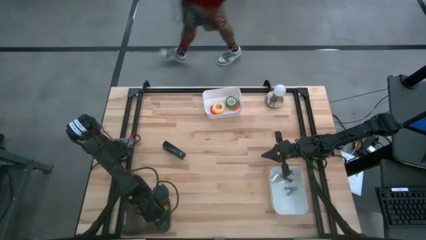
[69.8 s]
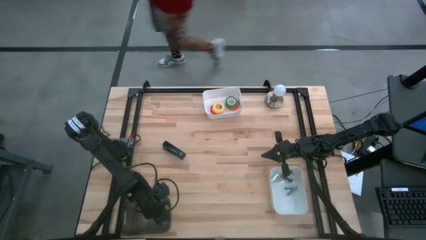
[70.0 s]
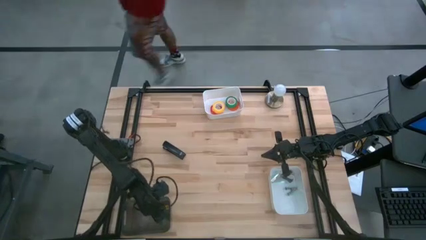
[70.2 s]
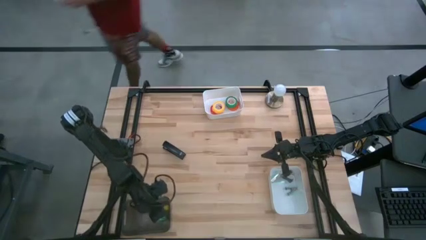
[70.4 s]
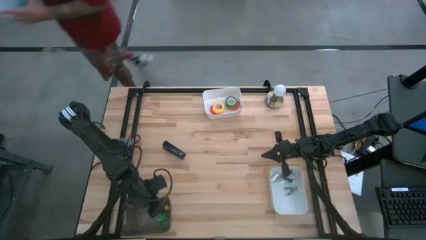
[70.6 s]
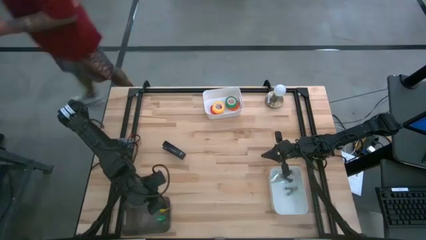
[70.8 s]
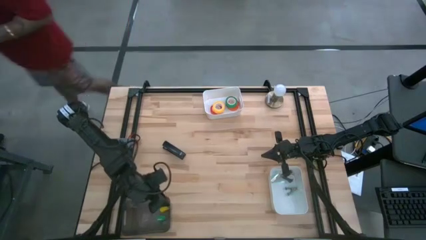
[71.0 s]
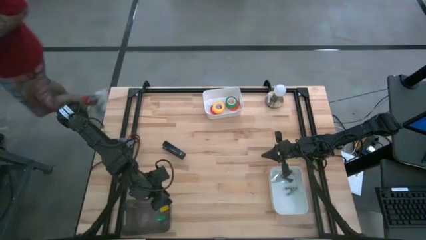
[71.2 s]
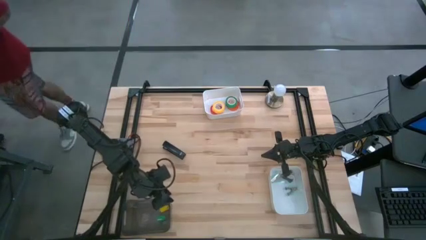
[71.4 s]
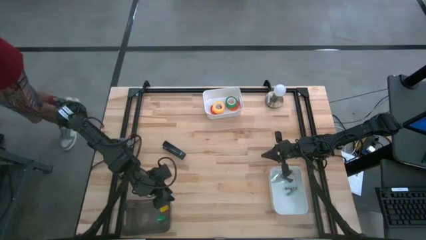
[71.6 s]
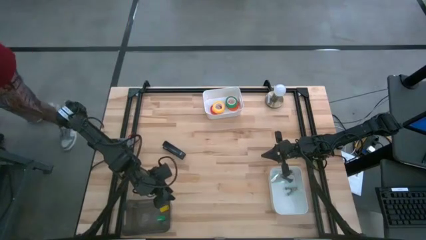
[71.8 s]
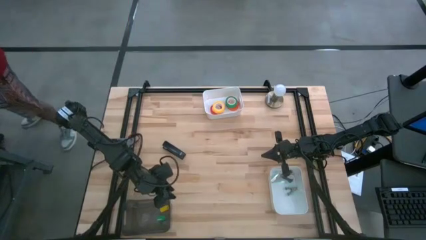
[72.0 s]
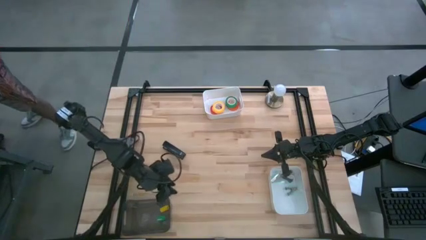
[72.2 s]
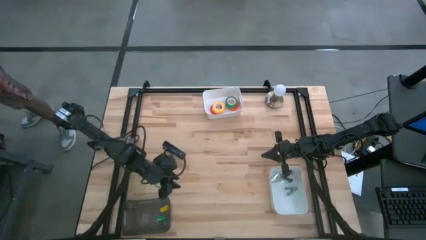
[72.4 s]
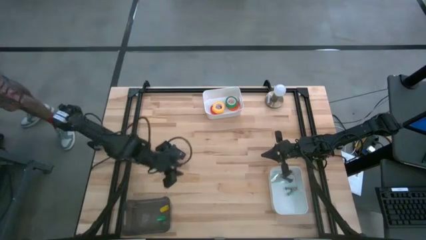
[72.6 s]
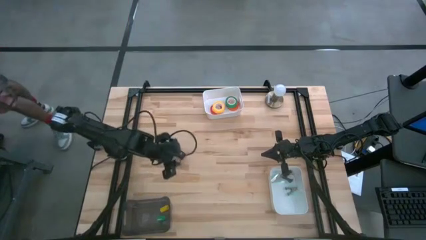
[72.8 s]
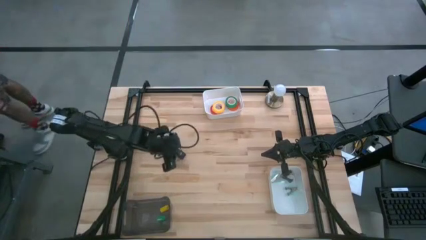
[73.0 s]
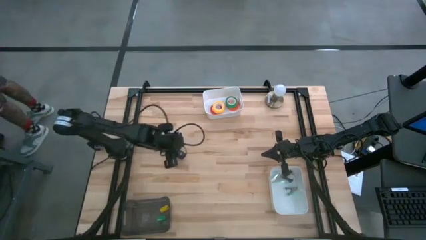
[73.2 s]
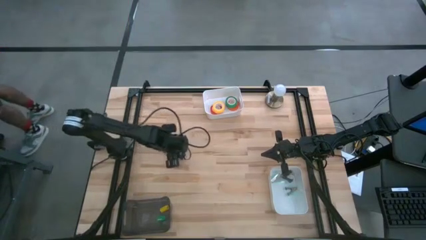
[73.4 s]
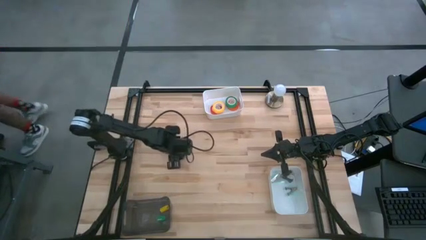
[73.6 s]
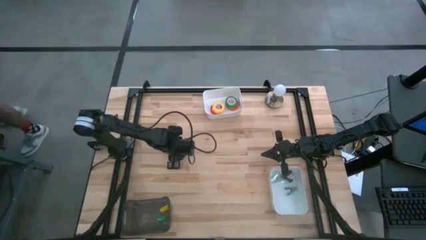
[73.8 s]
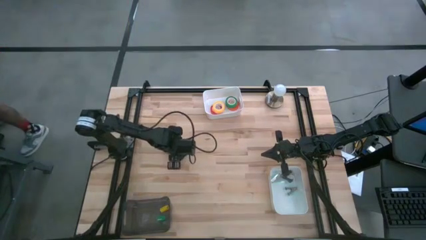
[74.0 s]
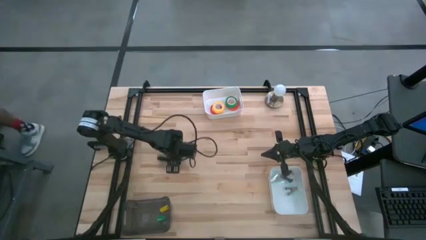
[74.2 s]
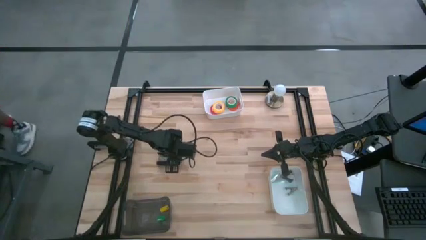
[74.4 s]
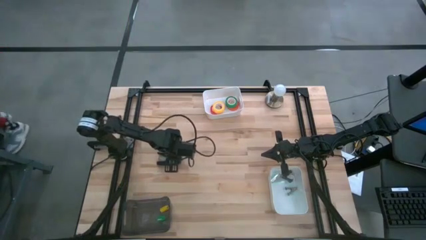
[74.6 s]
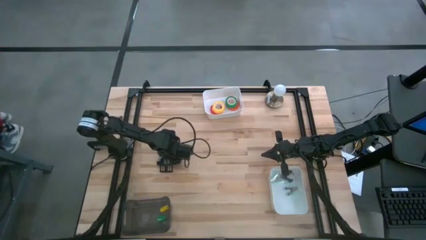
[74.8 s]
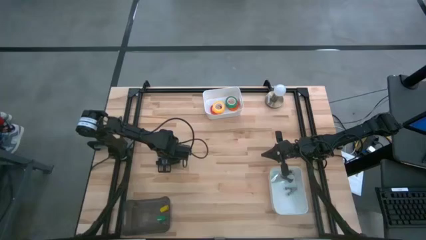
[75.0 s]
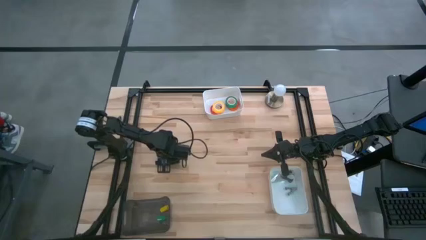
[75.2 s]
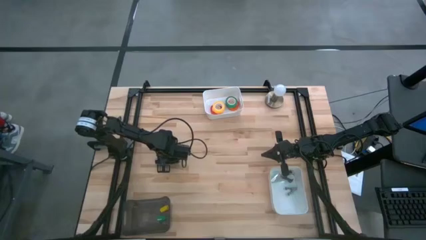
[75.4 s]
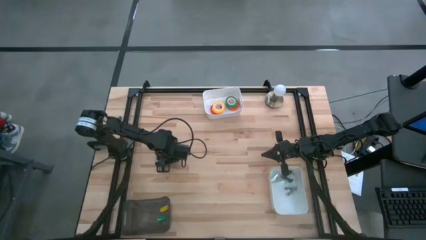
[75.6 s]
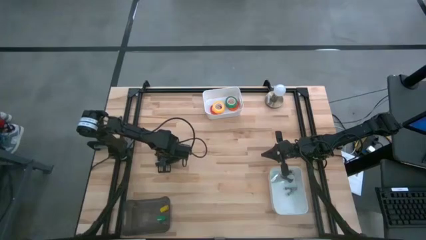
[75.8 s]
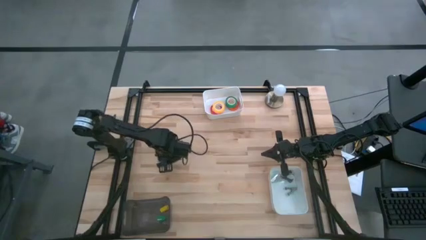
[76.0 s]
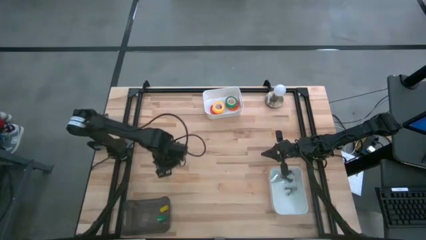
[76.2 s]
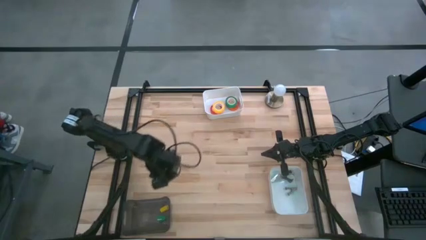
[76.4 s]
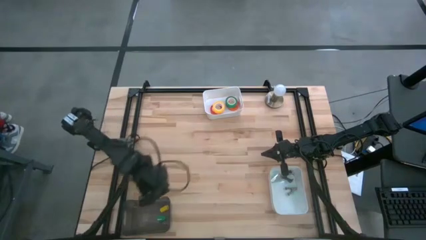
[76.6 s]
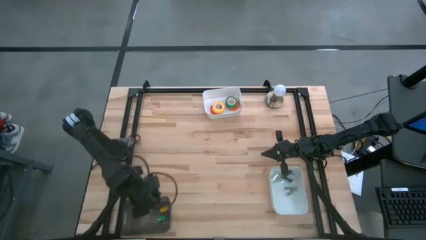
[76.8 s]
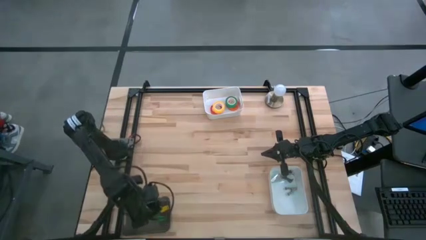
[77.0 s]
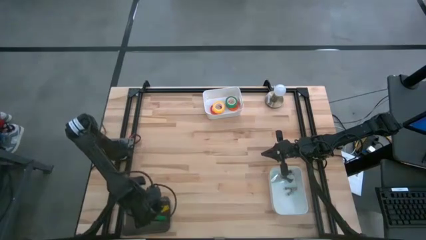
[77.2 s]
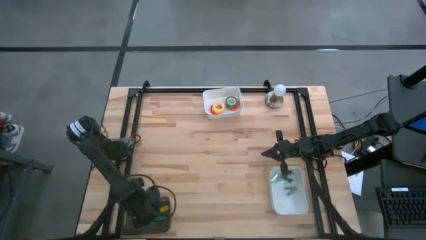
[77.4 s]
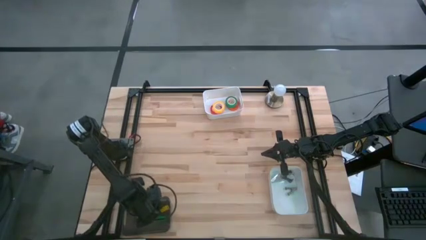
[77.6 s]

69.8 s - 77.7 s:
Task: Pick and place Stapler, Stapler remover, tape
Put the black large stapler into the transparent bin

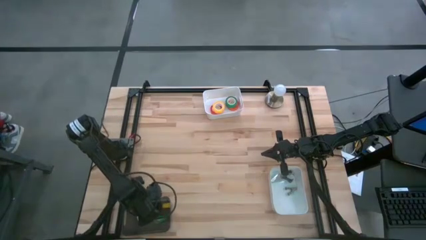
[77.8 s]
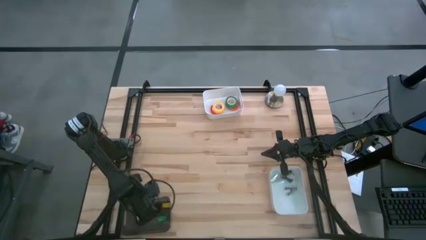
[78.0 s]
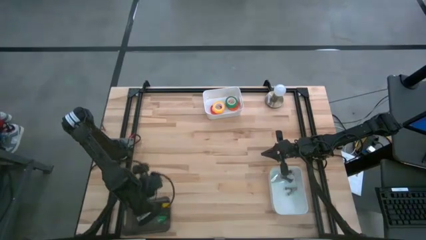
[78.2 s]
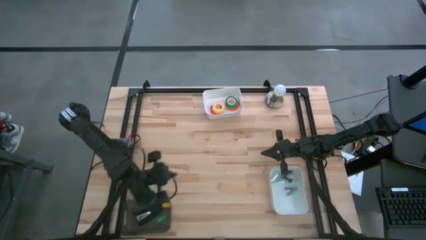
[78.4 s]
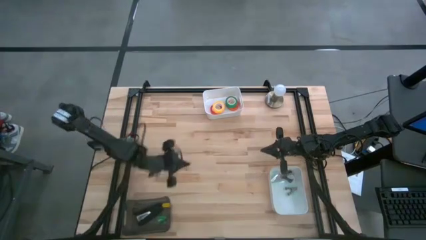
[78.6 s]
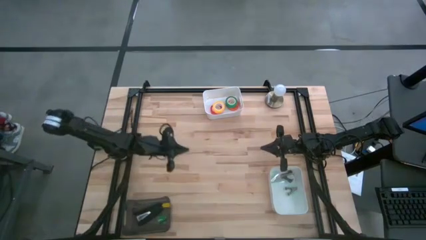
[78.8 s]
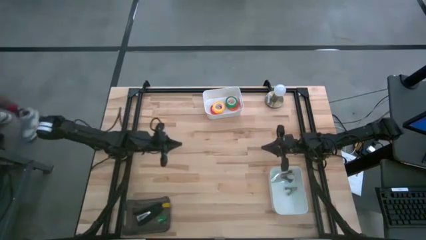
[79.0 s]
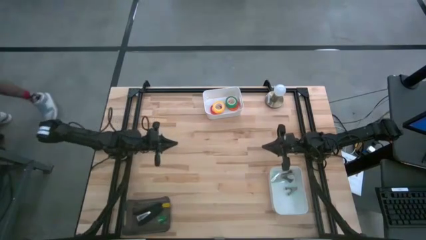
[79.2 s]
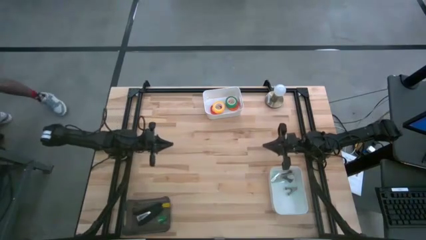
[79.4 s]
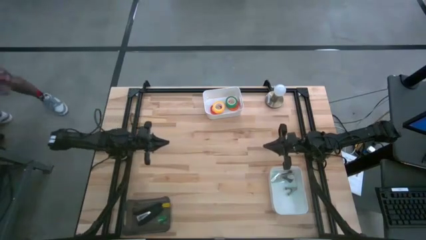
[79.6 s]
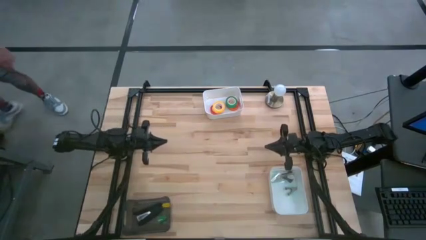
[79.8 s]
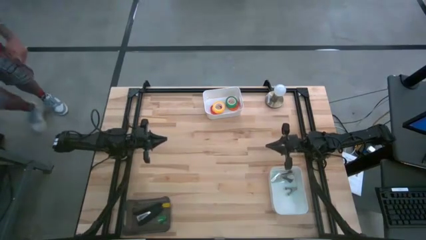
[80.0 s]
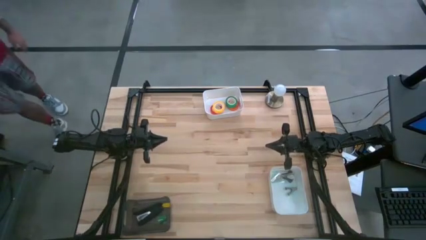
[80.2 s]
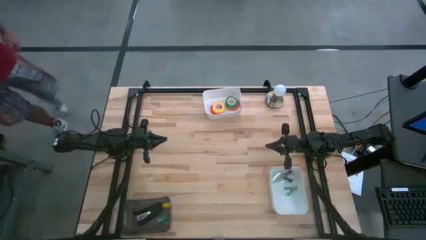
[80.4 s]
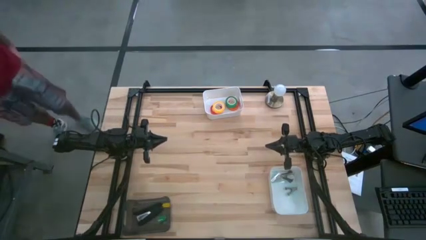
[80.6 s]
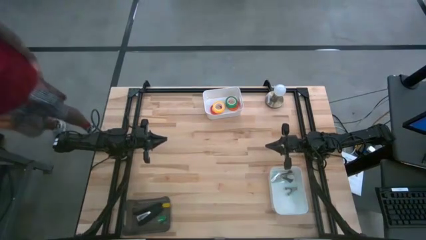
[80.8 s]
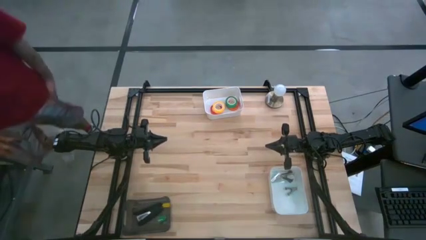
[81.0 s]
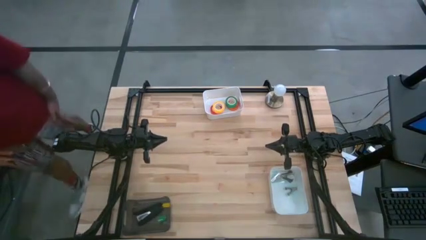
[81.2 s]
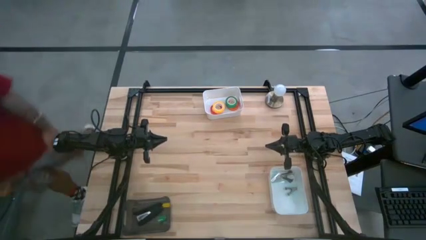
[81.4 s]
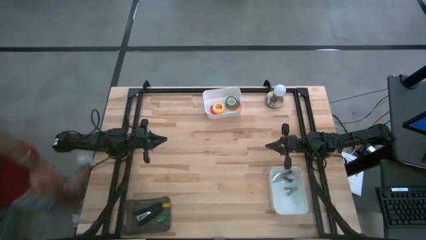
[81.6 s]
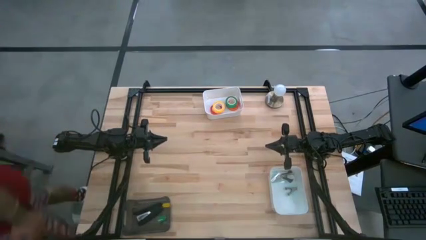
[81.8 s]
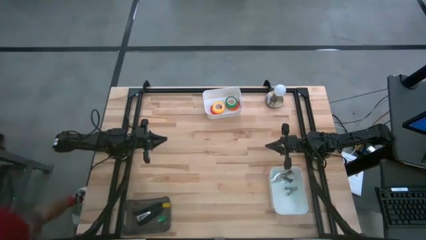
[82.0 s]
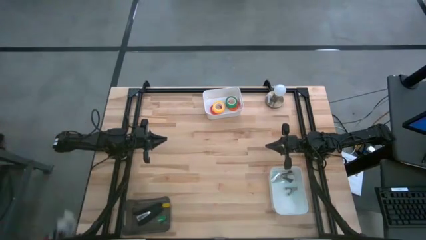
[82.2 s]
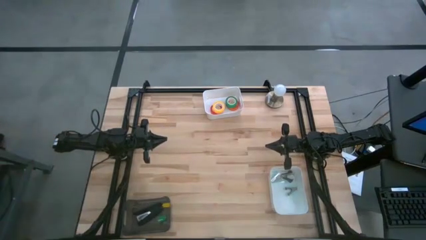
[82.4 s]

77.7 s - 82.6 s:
Return to Home Position

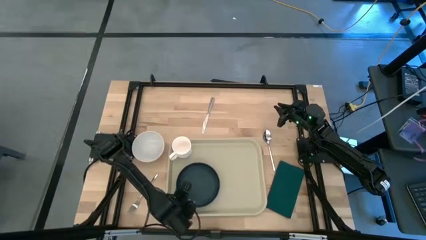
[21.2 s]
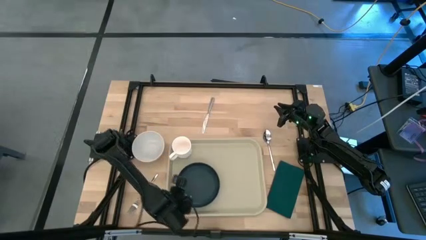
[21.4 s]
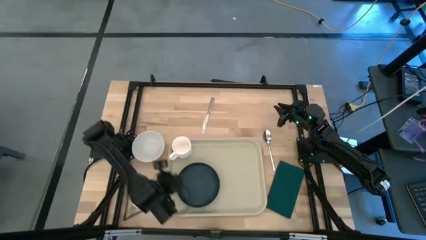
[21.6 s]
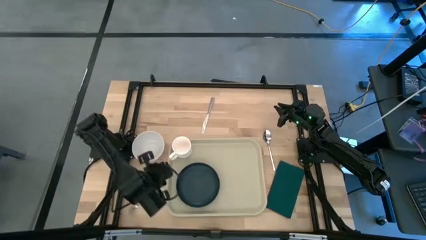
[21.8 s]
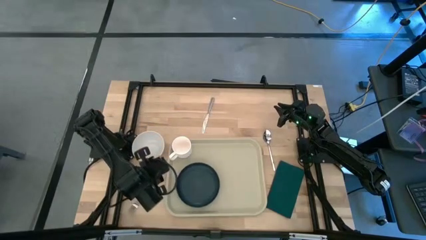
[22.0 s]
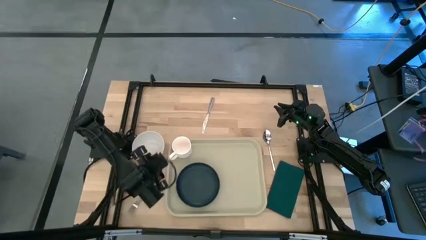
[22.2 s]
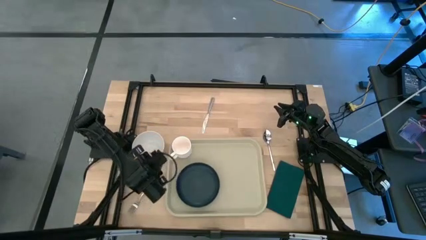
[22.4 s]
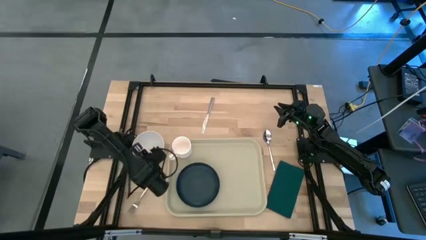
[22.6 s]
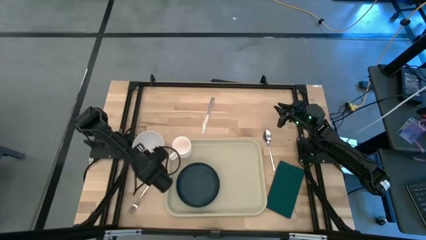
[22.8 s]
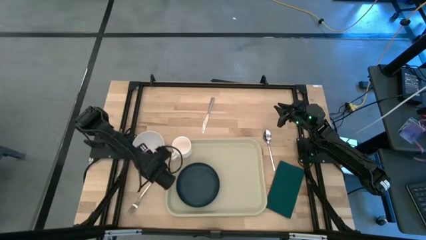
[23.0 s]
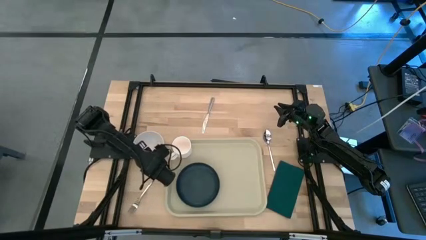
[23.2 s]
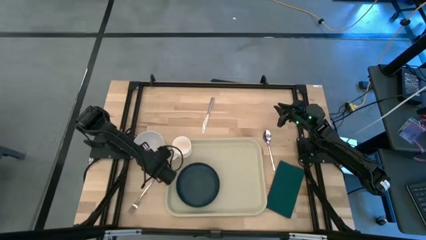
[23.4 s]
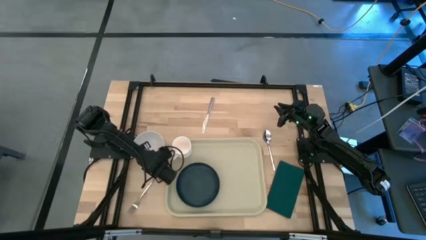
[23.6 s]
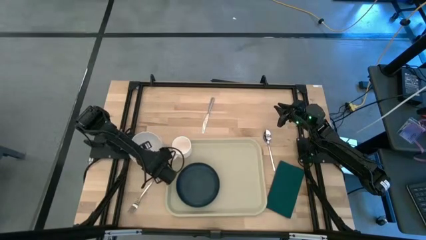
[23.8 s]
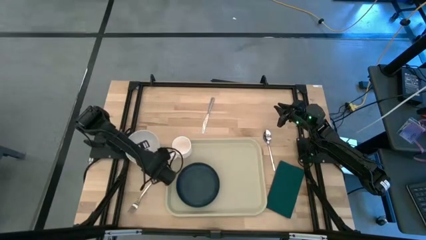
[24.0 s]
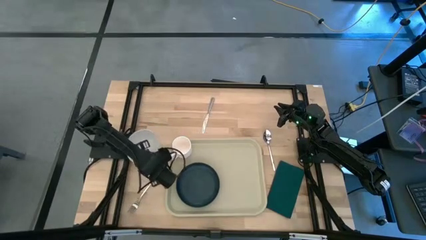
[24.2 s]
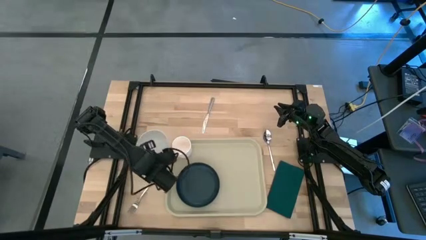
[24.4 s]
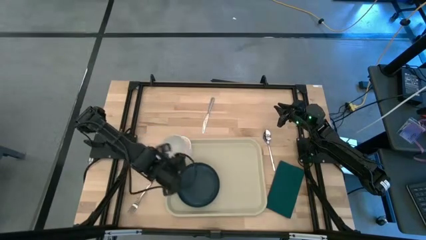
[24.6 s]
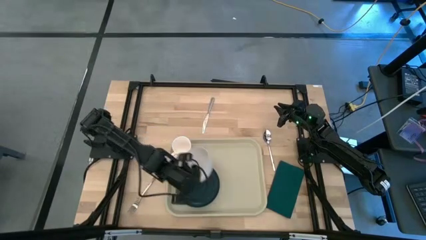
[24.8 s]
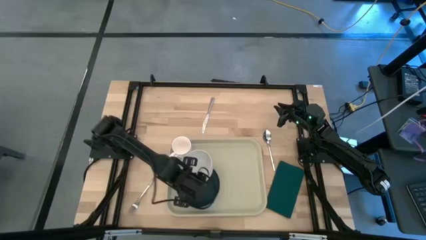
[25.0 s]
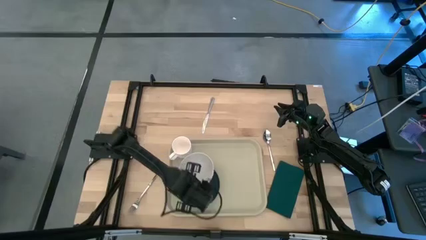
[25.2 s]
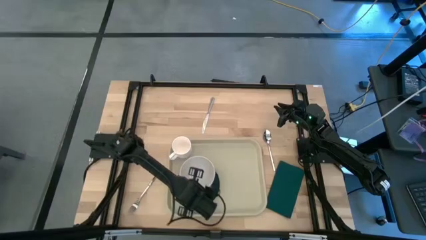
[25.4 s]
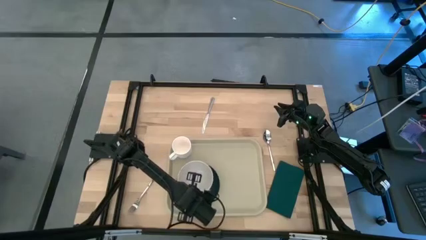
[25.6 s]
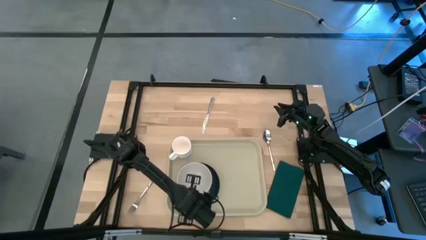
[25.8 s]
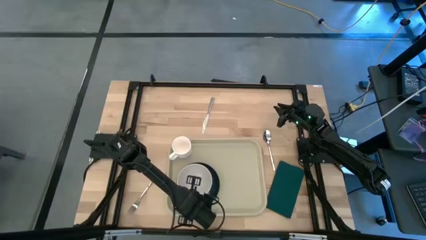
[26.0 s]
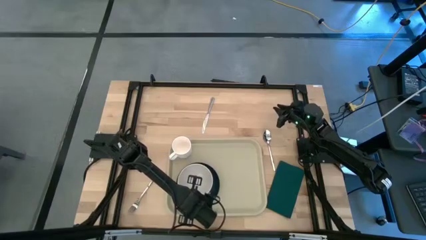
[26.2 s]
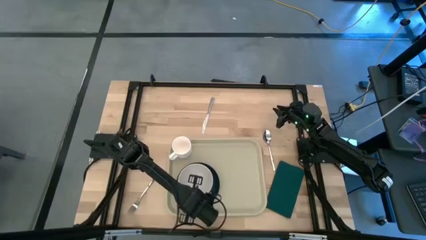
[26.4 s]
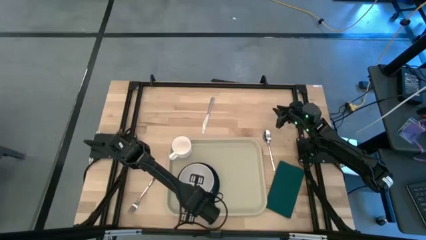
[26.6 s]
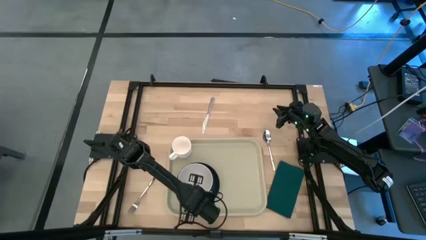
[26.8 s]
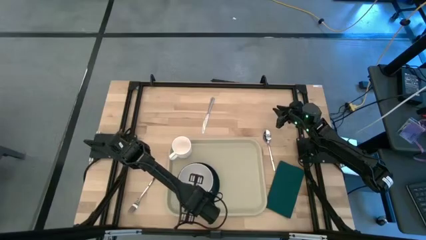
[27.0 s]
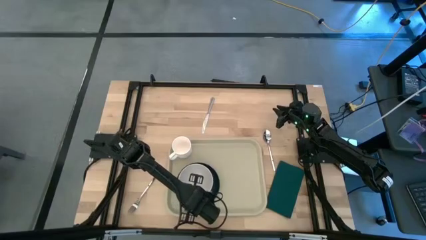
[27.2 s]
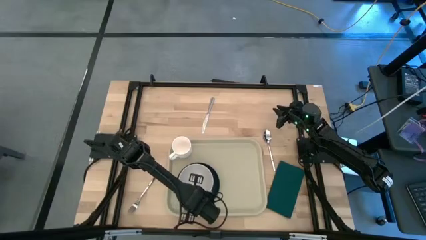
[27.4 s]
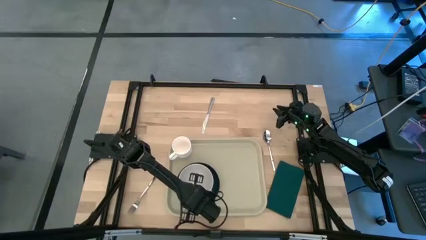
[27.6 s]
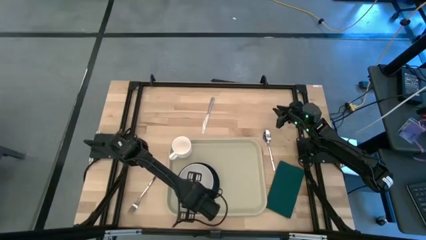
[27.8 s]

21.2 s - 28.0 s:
Task: Set up tray
Put the white bowl on the black plate
